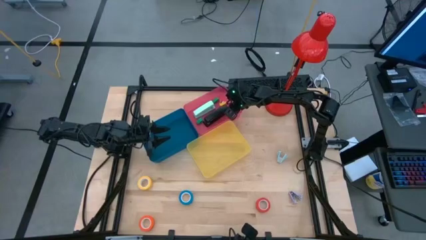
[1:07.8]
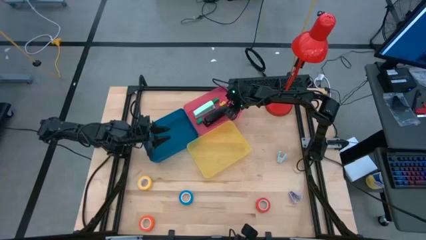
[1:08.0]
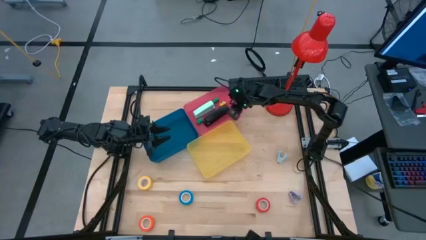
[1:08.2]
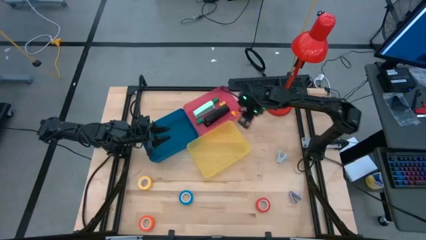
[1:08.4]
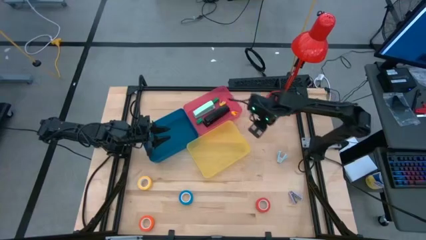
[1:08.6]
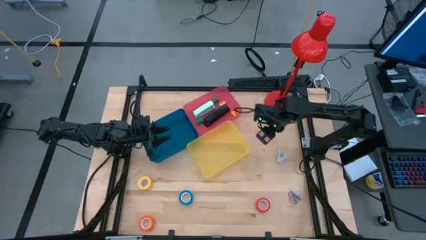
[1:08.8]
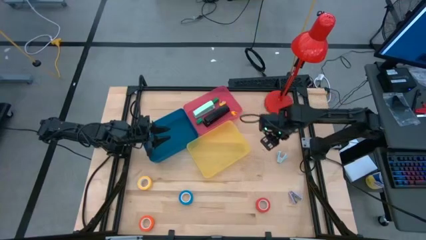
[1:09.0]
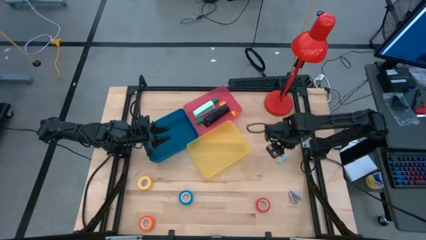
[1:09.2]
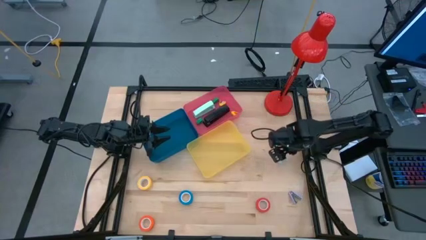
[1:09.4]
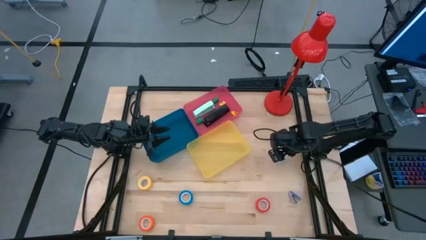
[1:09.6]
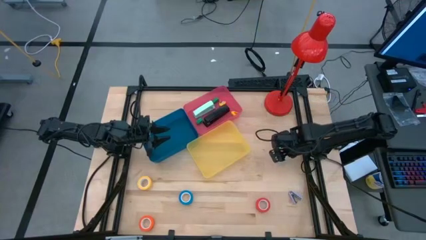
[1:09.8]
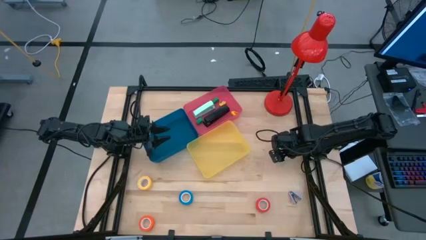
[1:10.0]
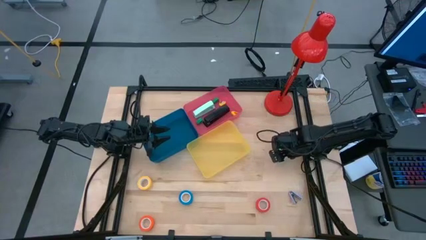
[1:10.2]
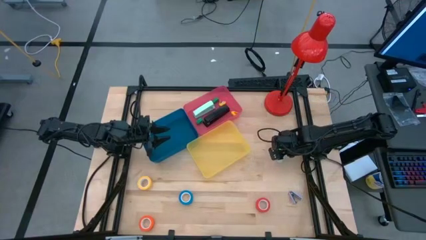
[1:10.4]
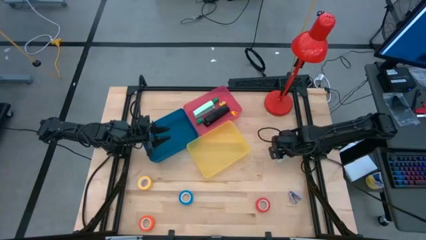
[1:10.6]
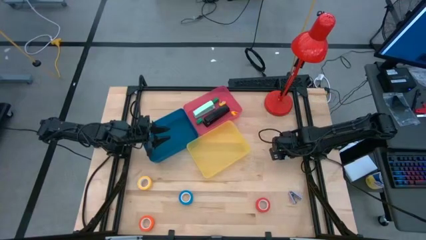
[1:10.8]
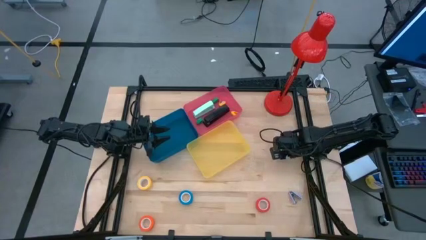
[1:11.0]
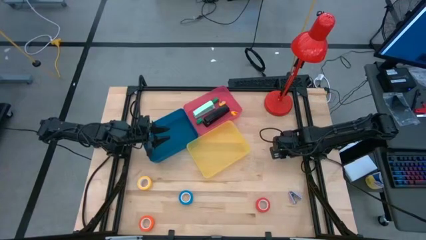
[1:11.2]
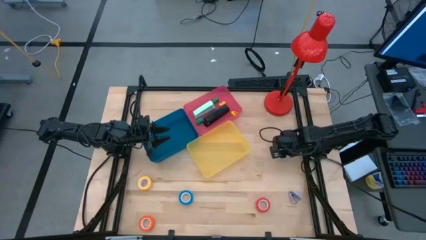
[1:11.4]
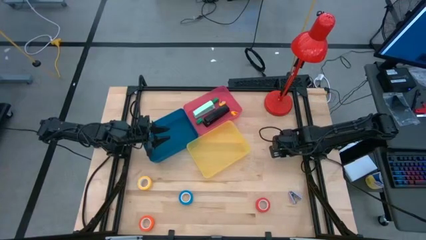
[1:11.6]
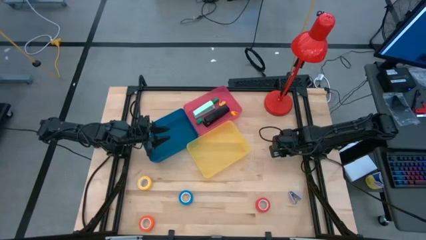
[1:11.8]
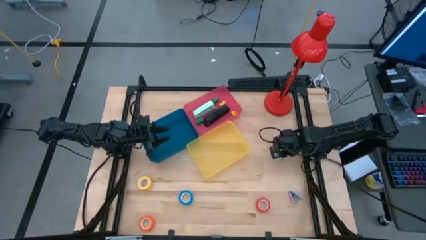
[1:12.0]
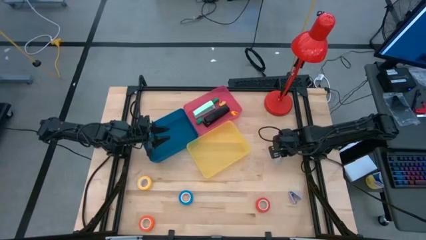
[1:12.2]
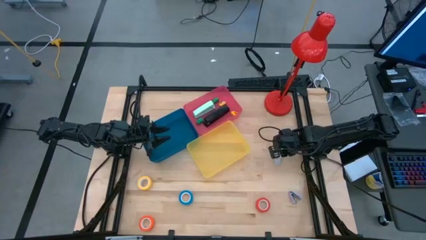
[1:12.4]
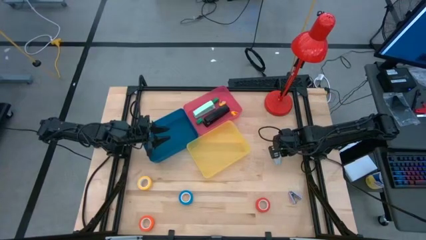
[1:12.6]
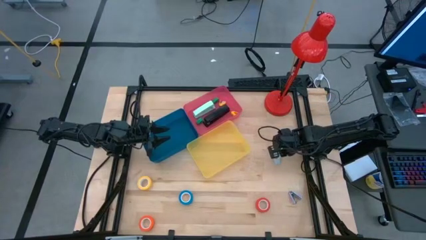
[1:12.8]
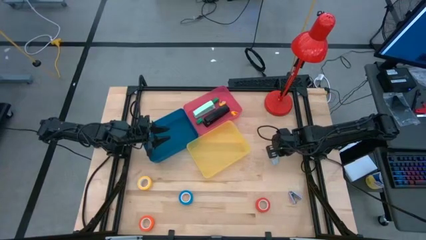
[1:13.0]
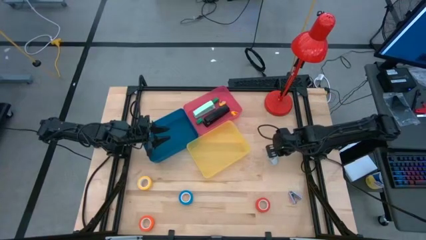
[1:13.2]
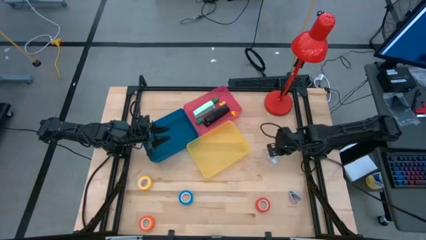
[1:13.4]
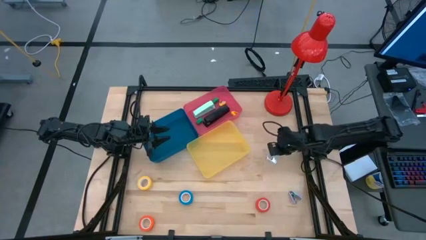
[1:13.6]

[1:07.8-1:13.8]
Task: Pick and place Stapler, Stapler remover, tape
Put the blue staple remover into the yellow bin

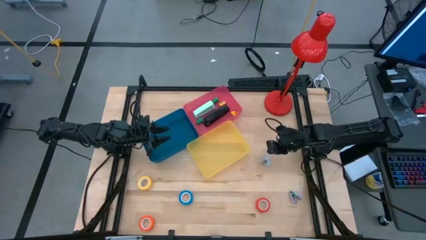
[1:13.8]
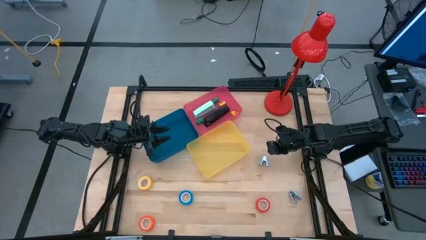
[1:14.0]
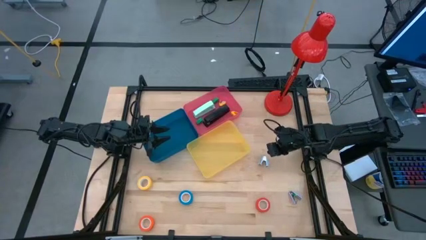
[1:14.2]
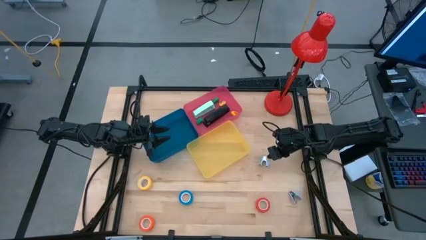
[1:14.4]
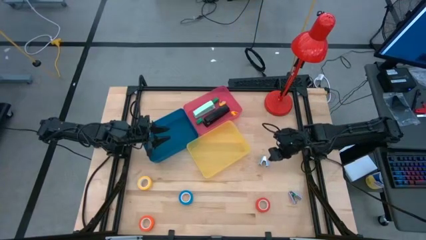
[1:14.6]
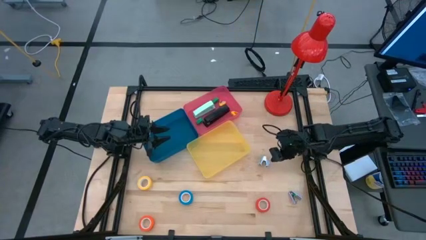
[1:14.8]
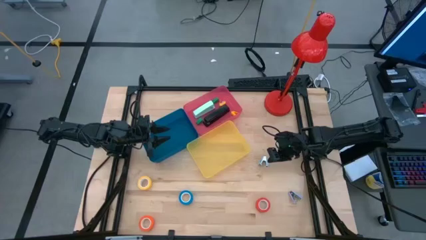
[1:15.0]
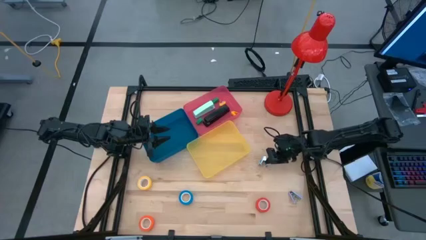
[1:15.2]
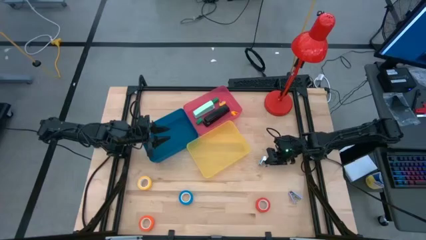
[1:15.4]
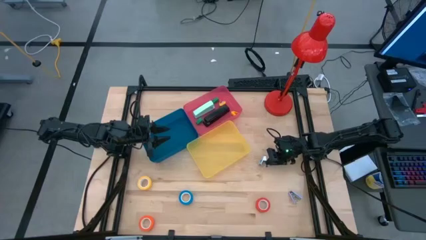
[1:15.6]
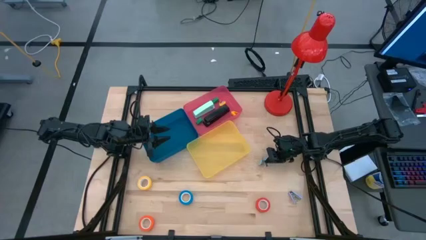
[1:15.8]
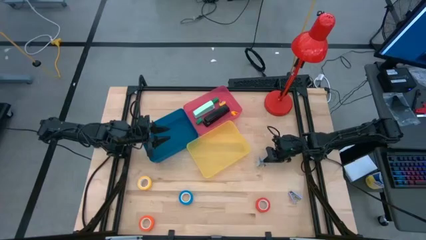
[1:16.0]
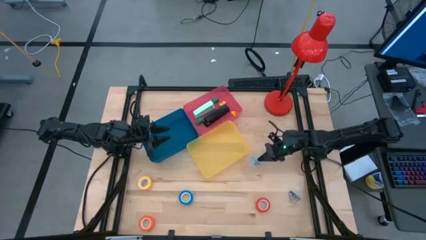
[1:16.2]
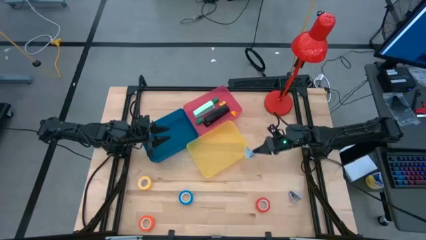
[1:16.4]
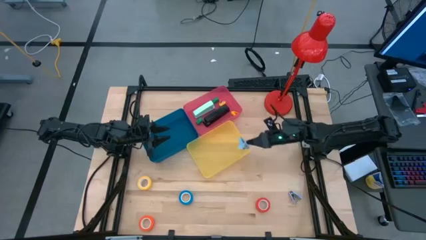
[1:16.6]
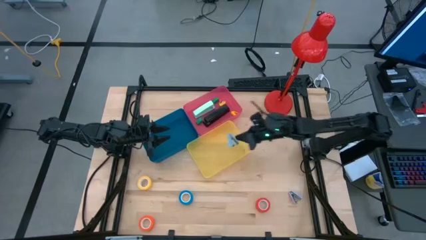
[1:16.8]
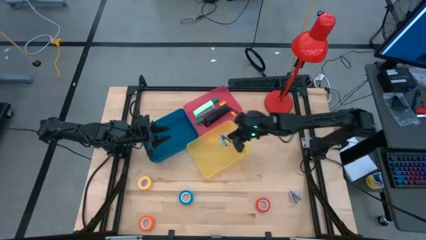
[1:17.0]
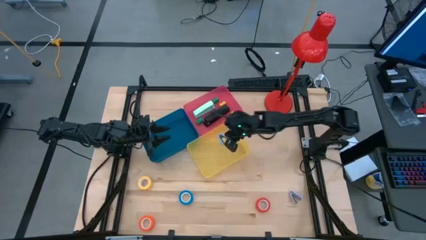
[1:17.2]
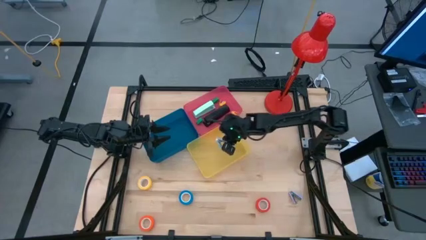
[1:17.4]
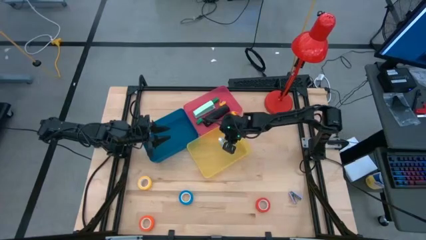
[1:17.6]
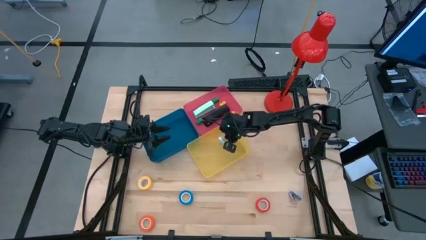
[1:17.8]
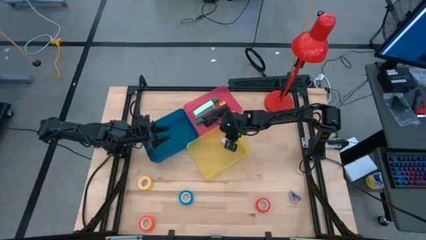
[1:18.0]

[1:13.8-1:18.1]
Put the blue staple remover into the yellow bin

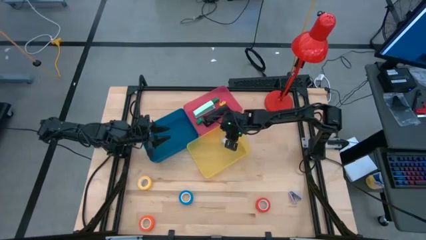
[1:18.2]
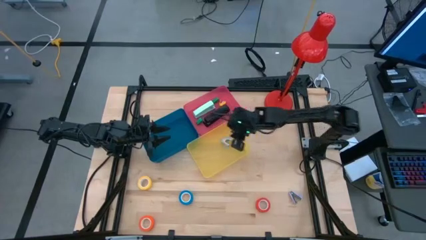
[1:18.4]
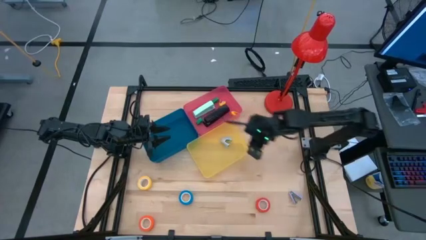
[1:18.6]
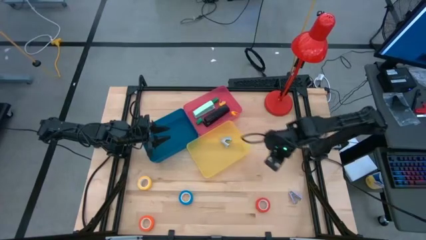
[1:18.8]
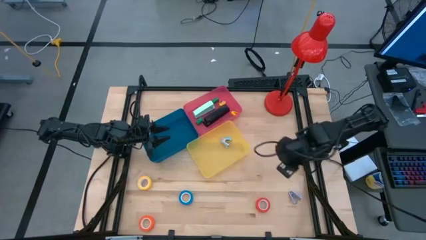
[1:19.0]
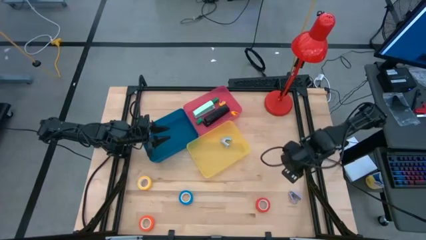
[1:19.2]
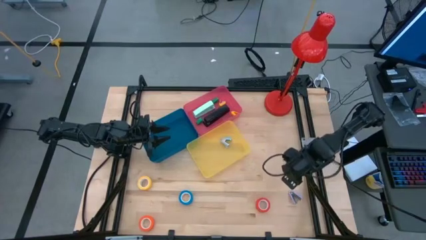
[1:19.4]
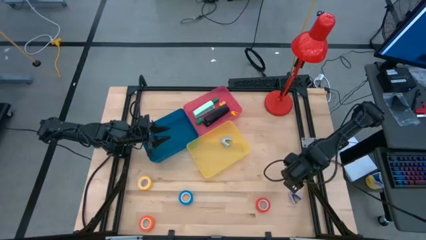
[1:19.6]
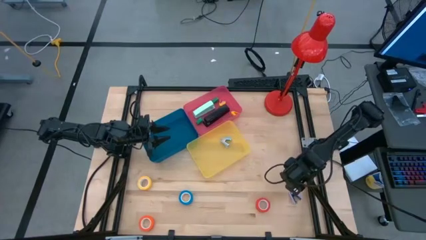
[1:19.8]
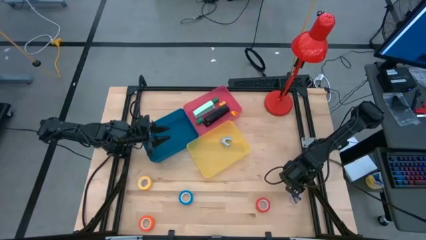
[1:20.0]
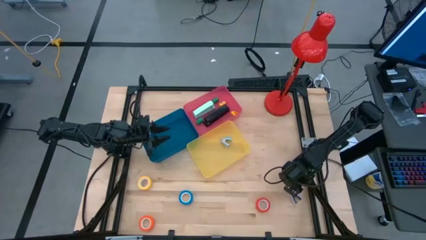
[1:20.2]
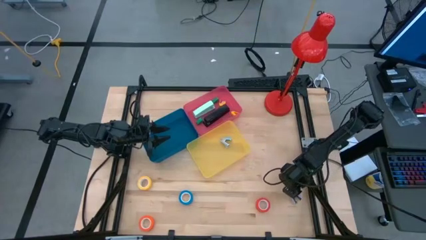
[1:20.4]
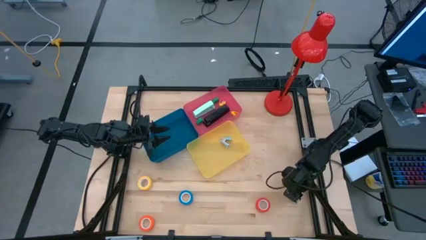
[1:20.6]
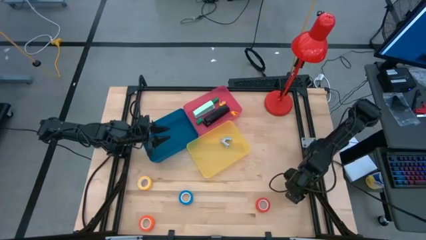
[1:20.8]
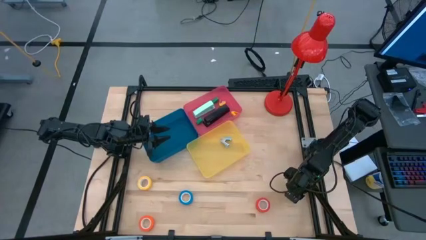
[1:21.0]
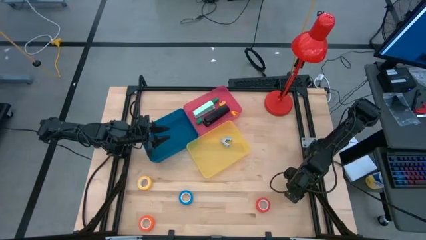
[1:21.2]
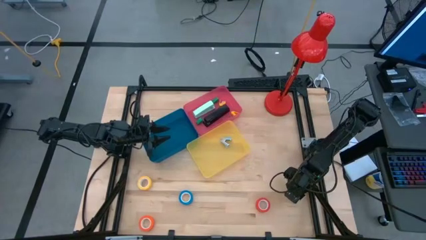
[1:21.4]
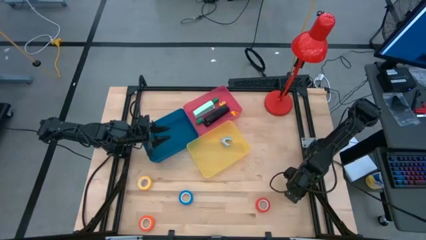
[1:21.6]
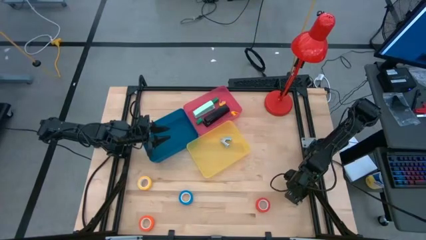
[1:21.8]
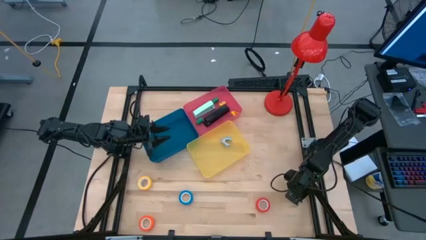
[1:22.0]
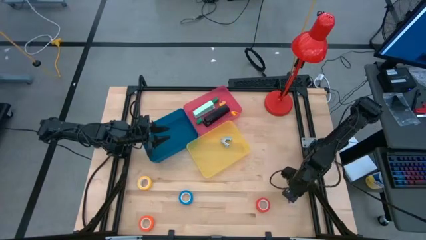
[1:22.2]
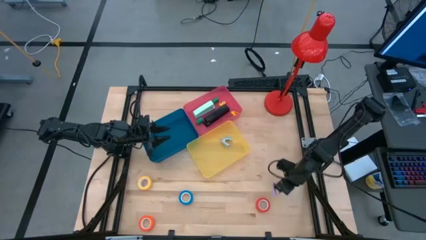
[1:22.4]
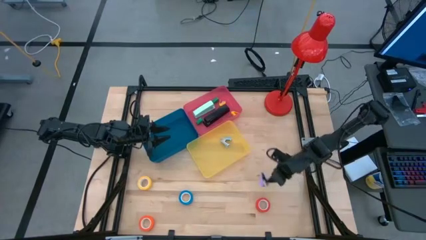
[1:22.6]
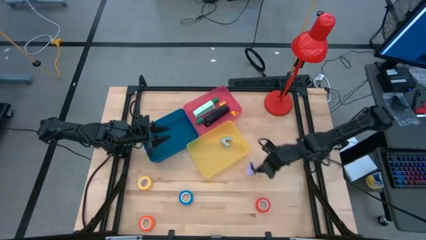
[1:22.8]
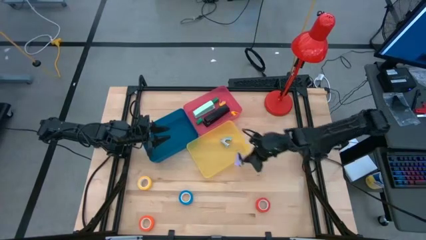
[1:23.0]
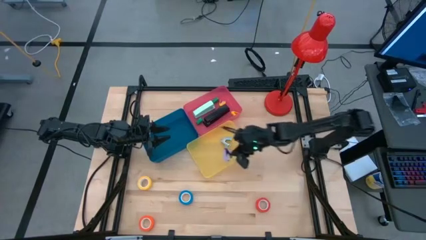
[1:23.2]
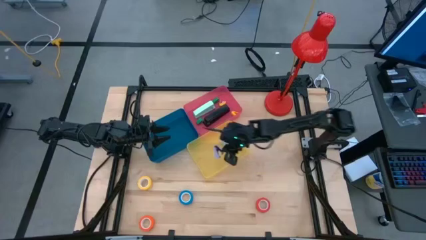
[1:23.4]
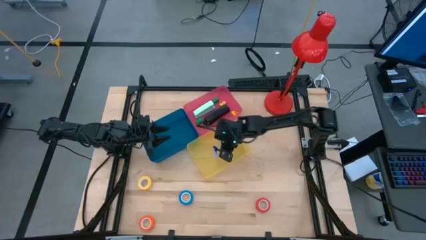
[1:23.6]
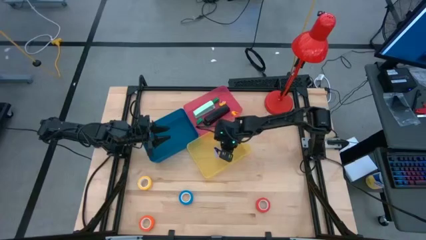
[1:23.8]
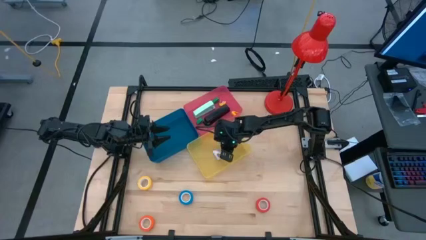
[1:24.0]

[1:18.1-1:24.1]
Put the violet staple remover into the yellow bin
